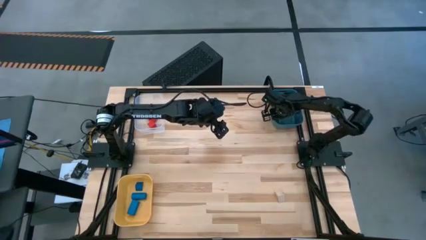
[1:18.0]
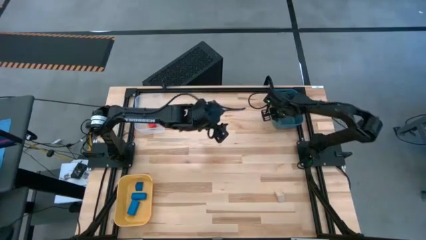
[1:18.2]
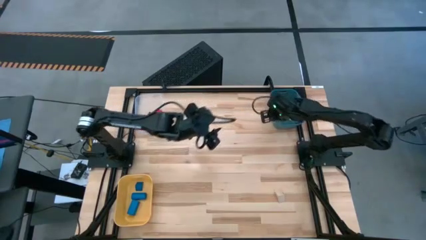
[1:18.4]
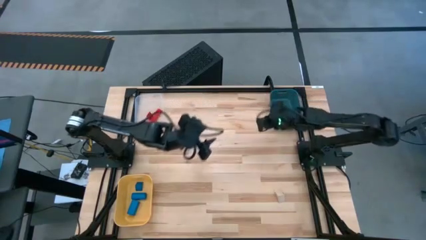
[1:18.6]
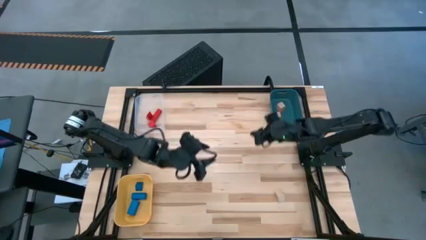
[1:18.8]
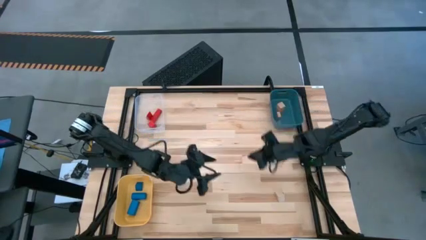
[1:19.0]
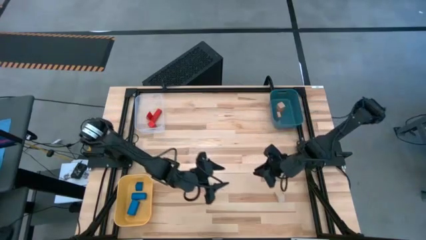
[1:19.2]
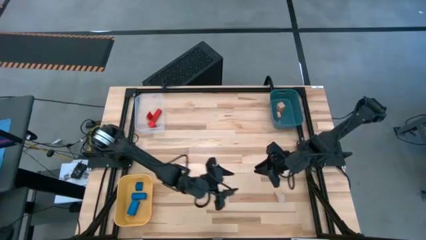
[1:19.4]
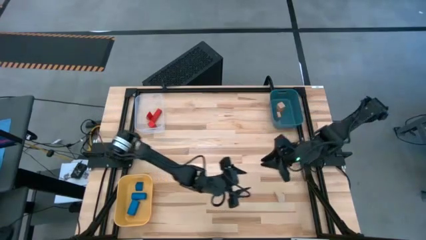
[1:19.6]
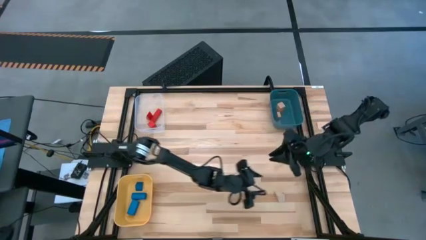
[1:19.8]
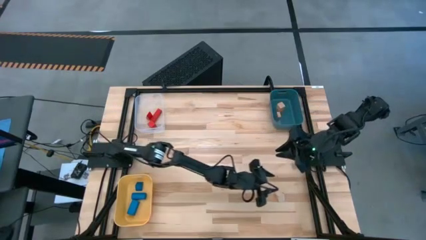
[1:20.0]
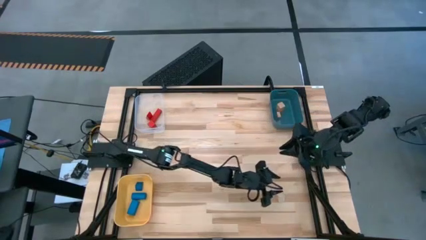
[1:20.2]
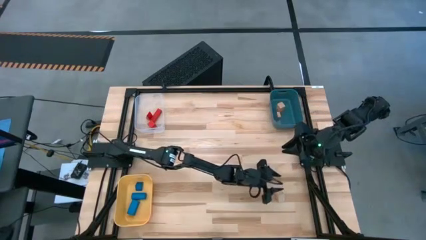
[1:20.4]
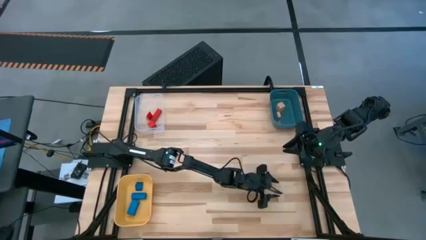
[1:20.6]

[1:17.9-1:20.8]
Task: Sort & place blocks by color
Put the brown block into the blue bin

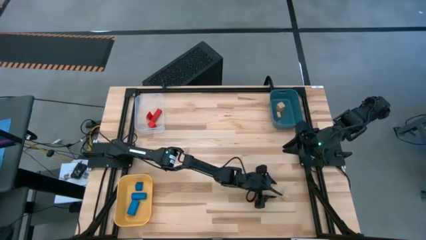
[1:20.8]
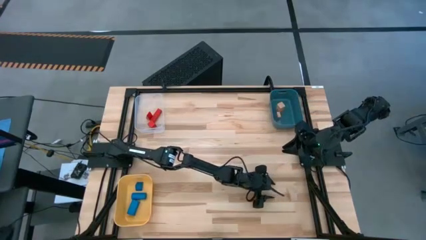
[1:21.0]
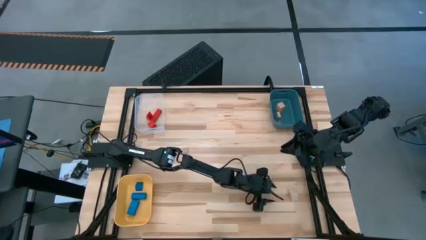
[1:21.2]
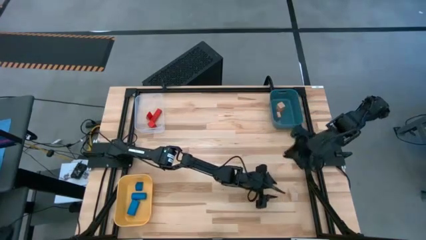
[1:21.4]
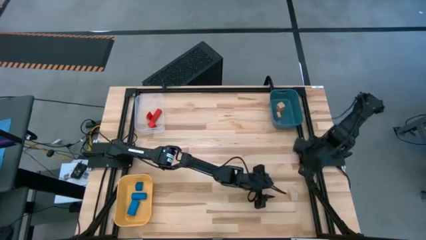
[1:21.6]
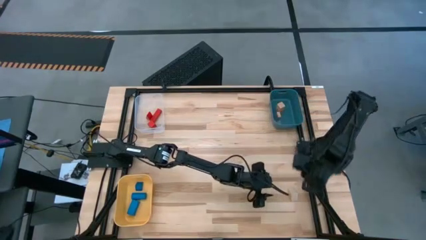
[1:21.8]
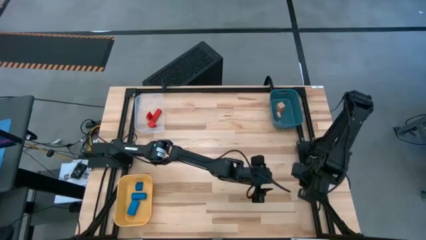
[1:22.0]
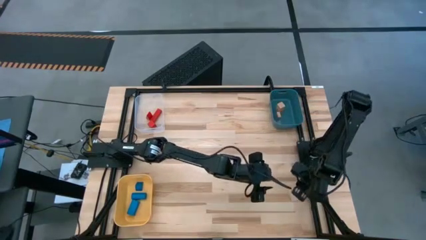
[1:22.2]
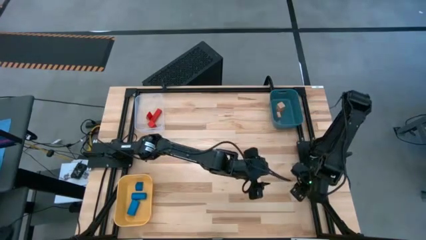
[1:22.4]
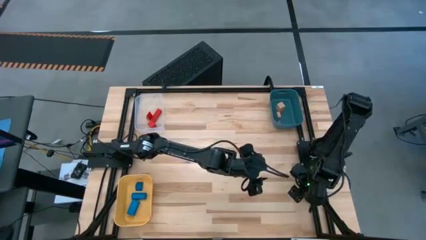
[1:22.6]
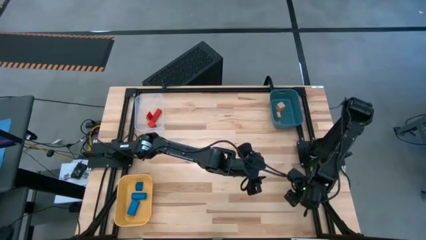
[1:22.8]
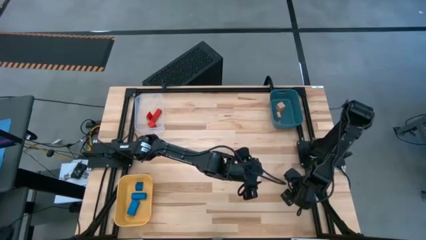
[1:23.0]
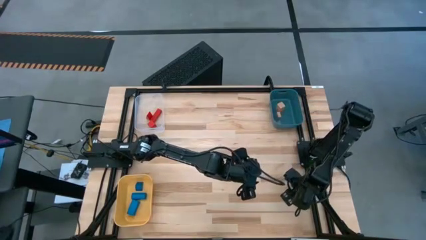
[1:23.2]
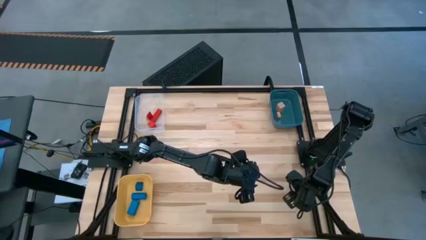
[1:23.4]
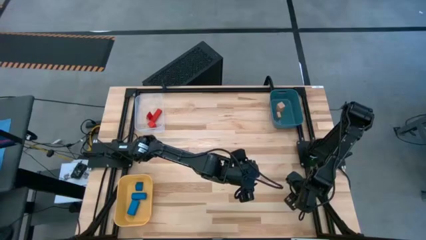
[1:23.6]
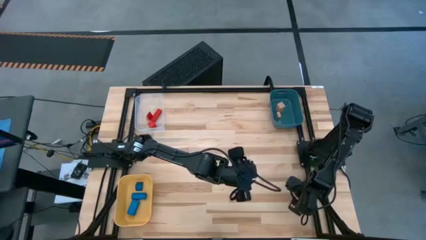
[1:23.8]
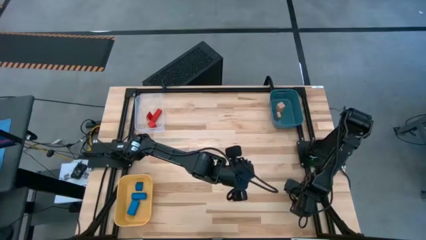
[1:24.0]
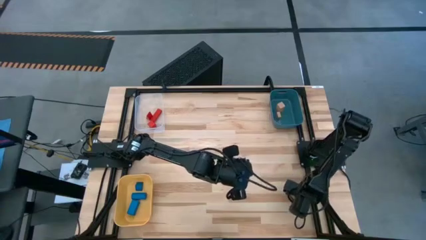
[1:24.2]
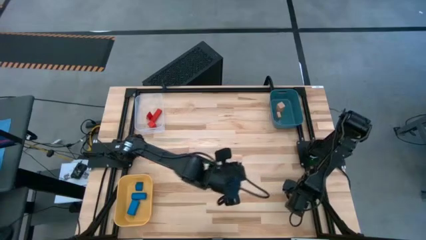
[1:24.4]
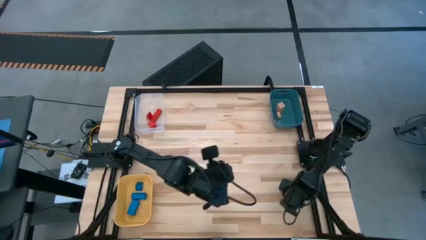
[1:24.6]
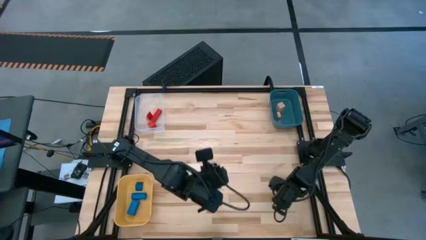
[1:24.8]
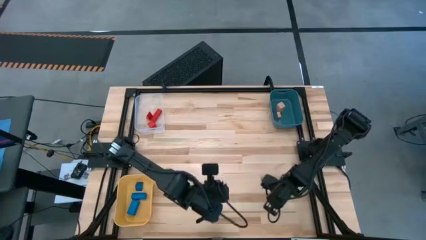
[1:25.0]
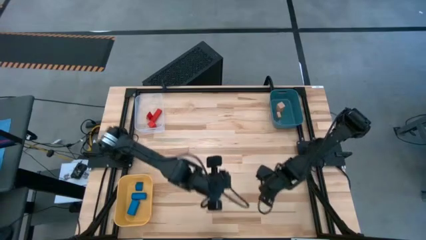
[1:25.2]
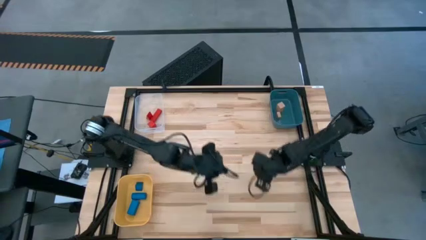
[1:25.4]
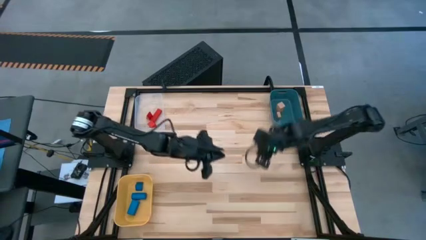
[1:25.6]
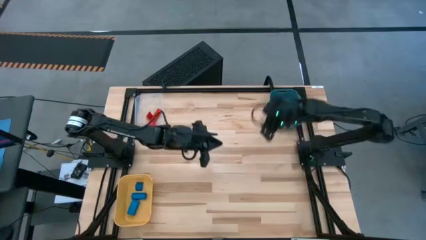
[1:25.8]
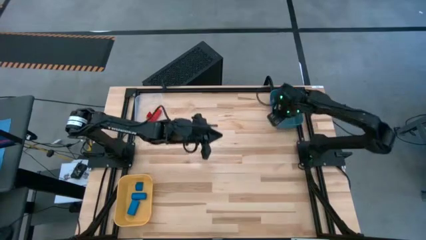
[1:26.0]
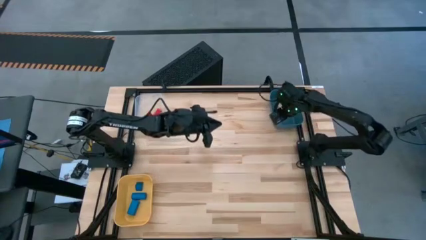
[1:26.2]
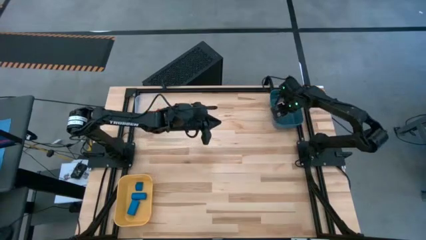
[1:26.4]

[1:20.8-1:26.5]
Put the brown block into the blue bin

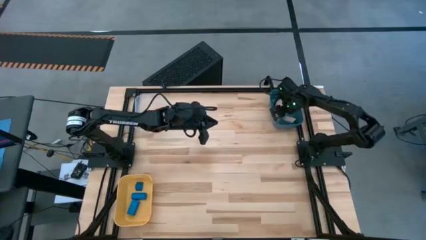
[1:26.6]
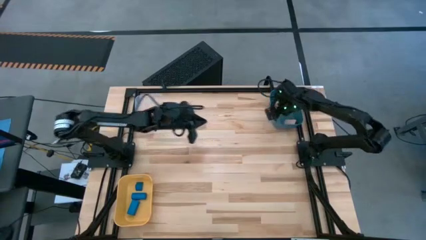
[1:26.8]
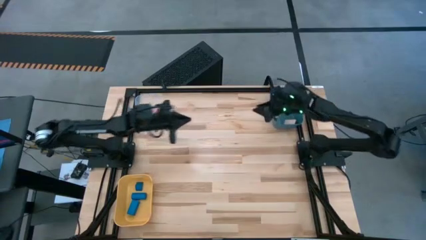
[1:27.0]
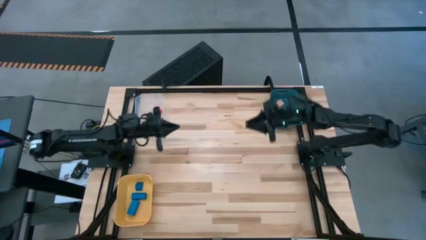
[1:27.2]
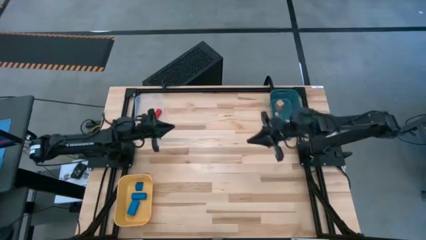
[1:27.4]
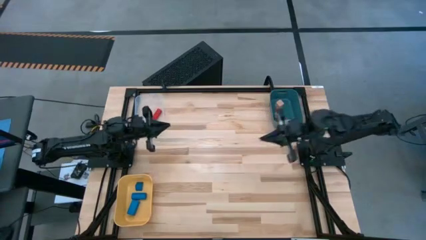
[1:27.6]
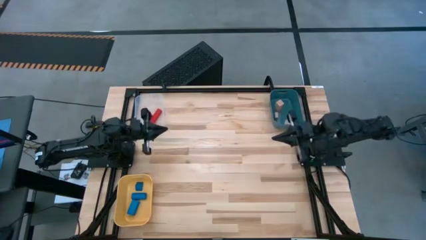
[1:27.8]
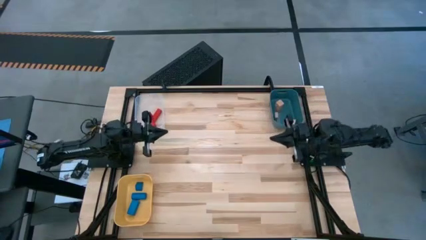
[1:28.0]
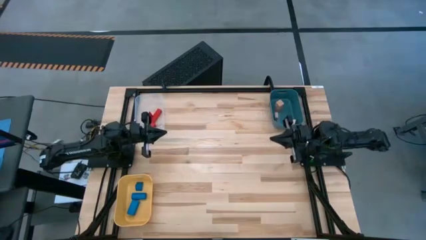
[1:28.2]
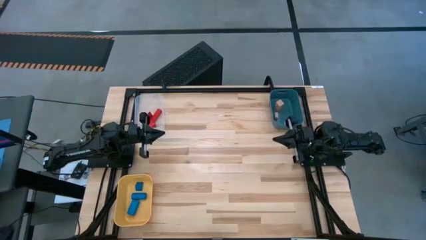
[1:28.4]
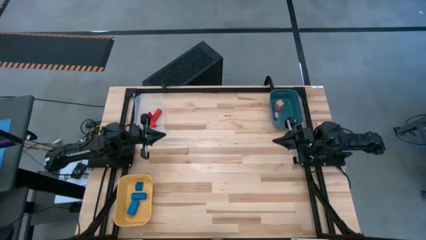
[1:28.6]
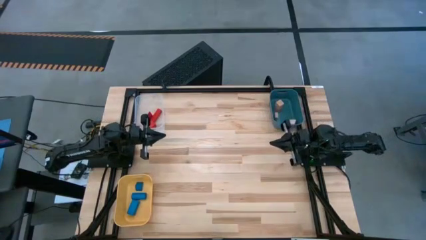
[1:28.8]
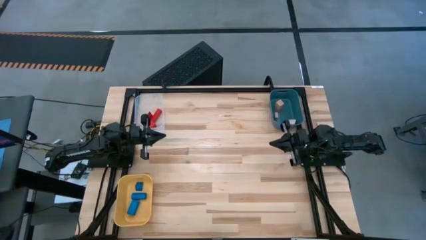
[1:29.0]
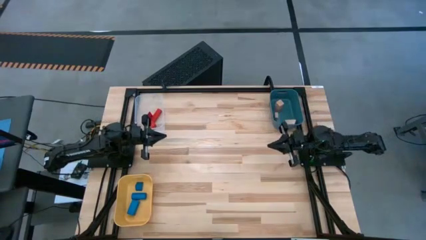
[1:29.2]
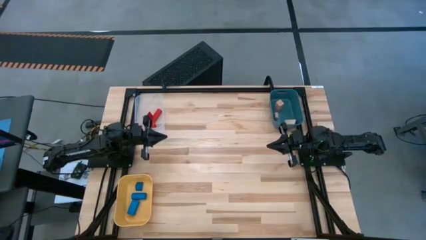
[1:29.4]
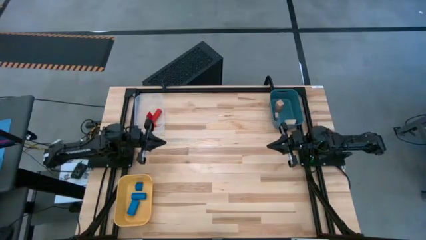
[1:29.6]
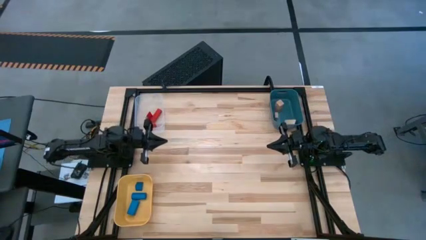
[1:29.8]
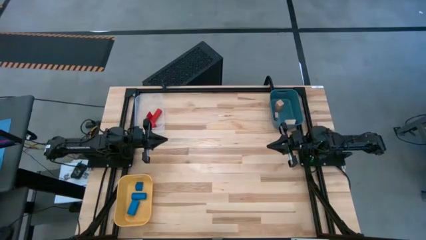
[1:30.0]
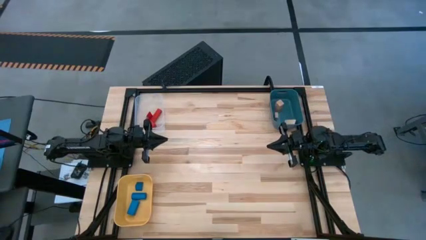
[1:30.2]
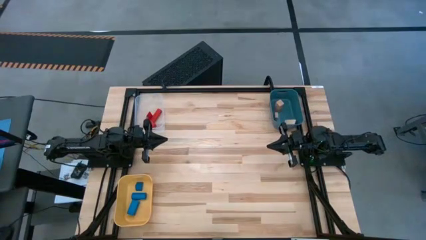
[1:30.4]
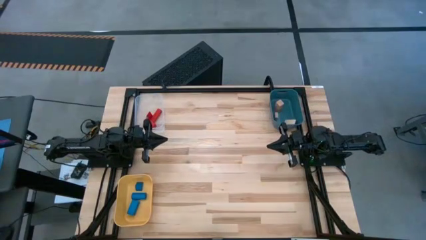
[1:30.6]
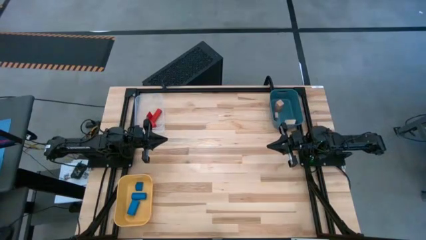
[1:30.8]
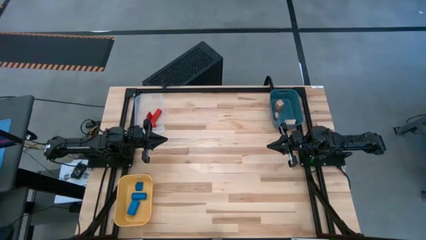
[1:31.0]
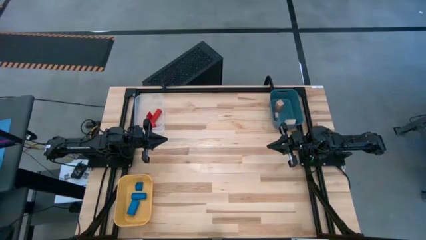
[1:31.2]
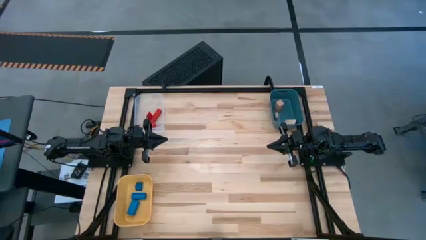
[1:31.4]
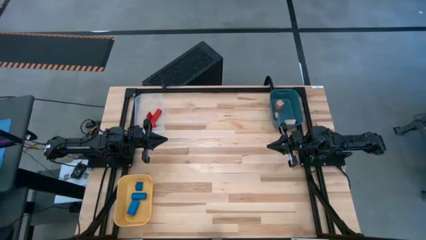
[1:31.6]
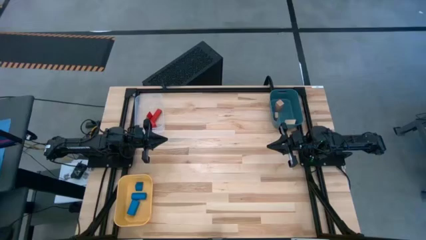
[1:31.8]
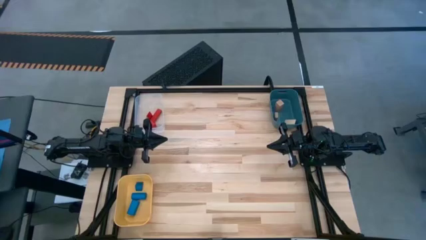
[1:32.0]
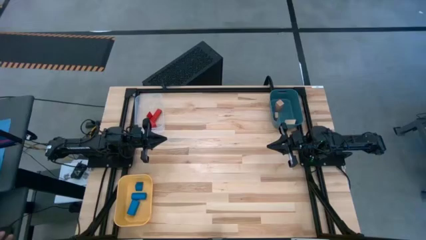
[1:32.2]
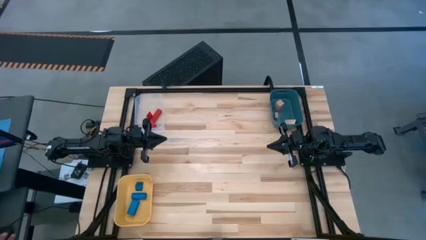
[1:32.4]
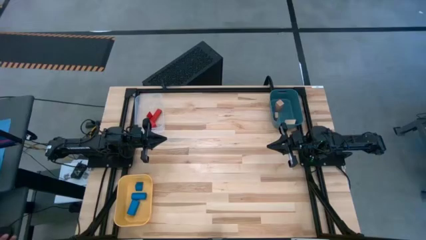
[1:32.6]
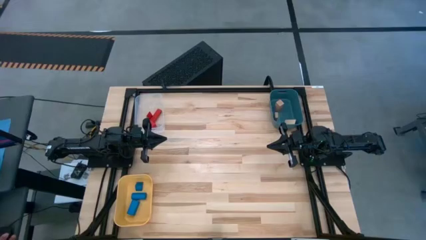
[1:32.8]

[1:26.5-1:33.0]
Return to Home Position

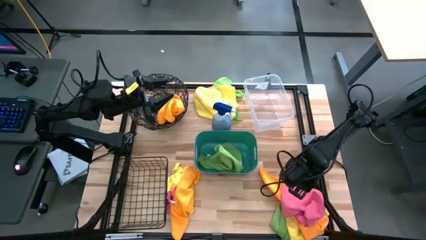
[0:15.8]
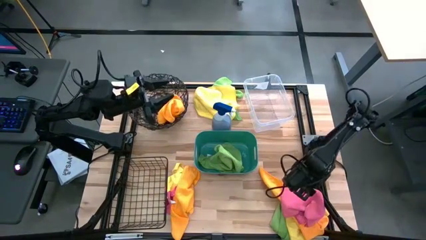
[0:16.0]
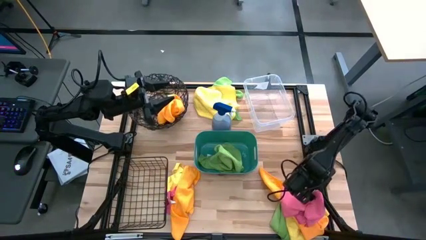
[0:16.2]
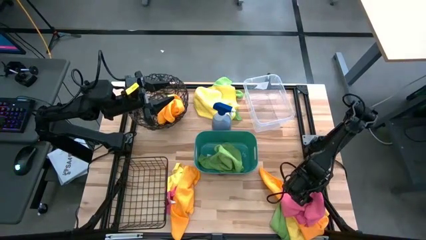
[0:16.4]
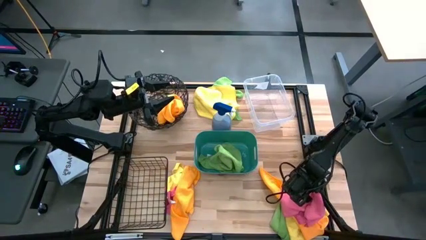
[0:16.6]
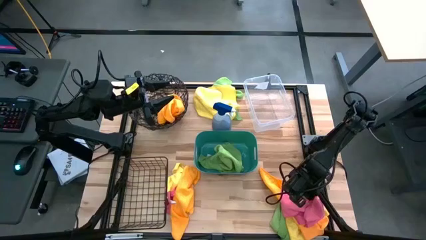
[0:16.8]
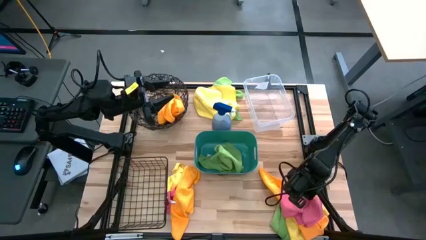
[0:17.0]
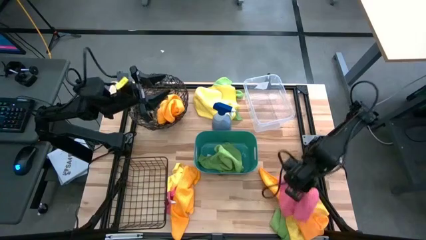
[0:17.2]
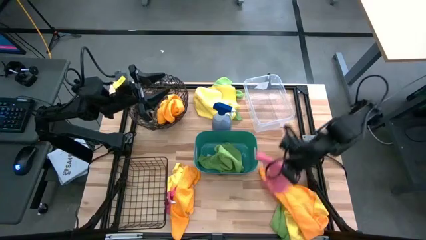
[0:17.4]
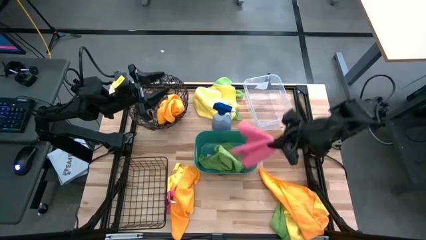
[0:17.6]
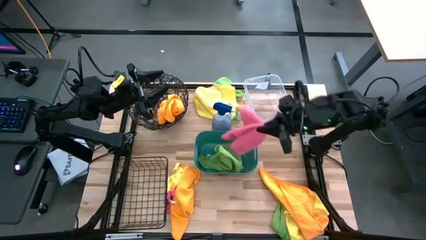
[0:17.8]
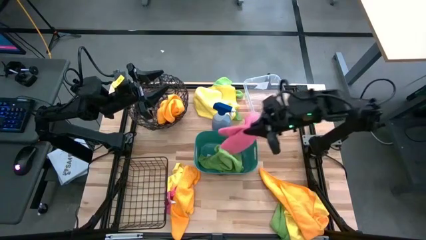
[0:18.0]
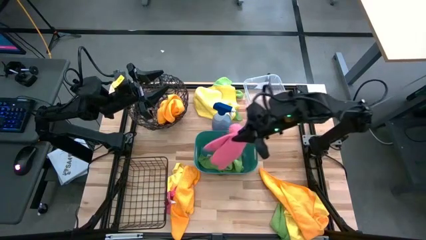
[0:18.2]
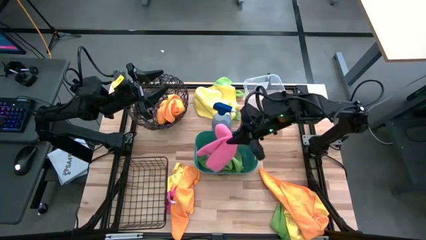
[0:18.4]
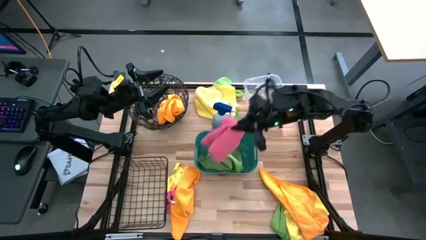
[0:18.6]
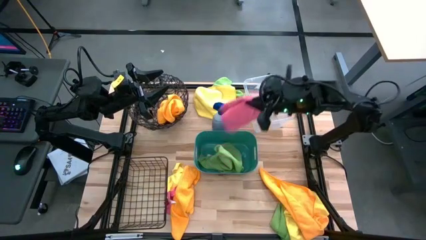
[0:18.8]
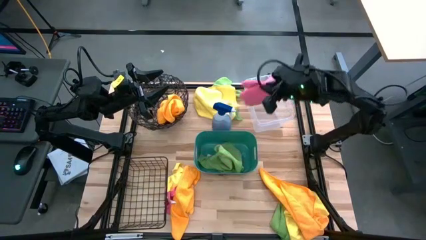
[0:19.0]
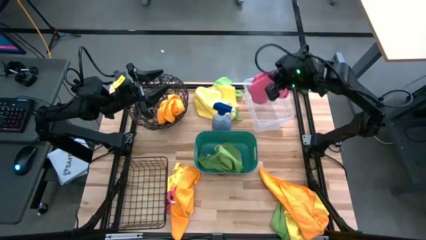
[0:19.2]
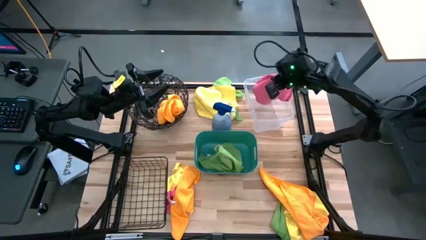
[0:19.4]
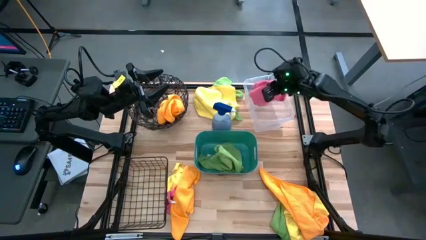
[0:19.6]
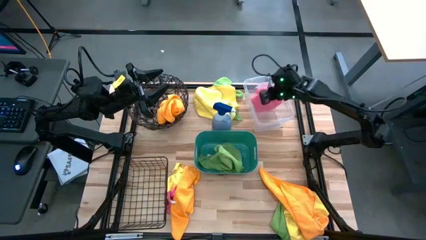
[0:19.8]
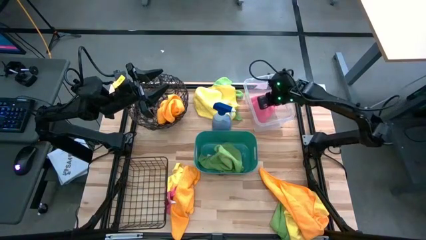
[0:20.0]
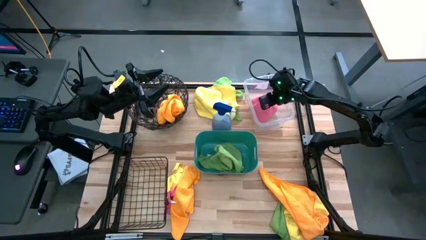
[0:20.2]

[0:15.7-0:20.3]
Task: Sort microfiber towel by color & place in baskets
Put the pink towel into the transparent bin
